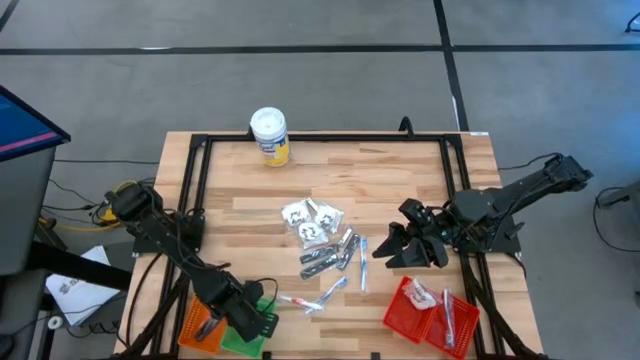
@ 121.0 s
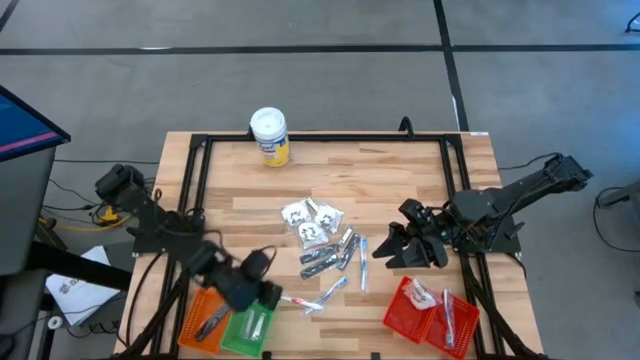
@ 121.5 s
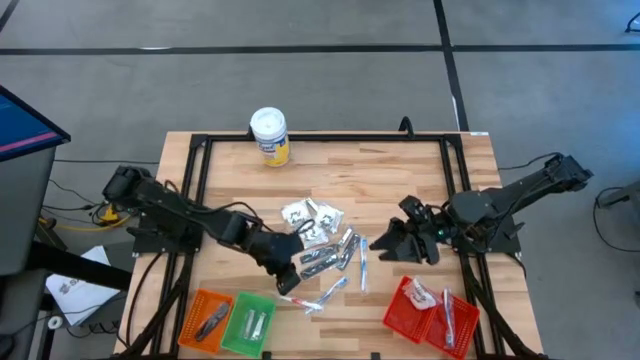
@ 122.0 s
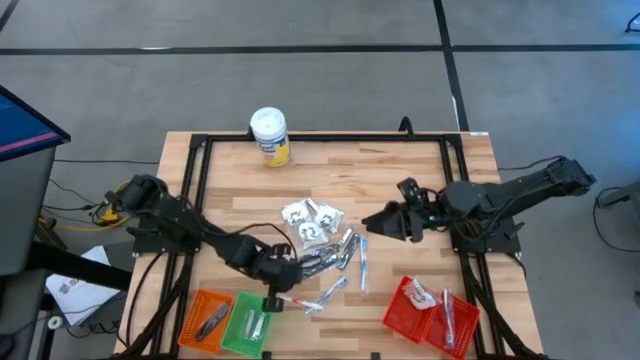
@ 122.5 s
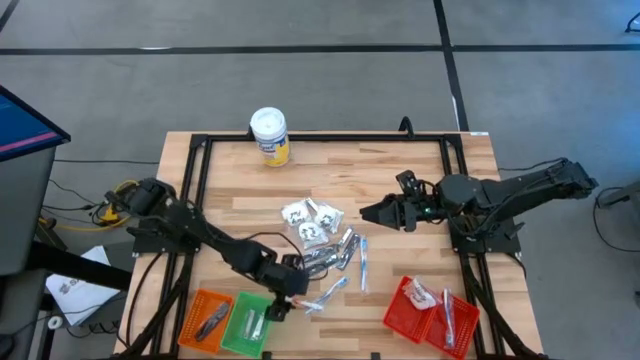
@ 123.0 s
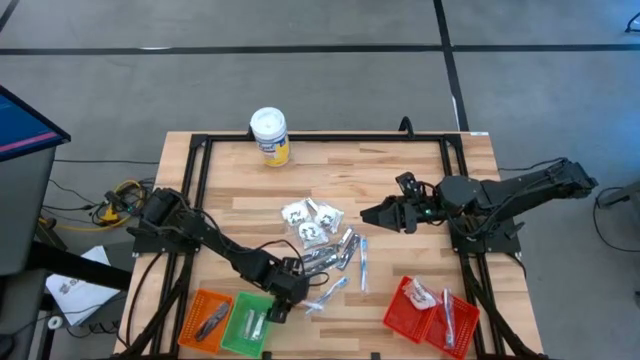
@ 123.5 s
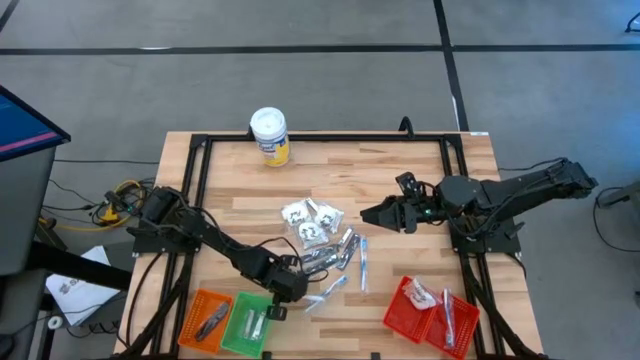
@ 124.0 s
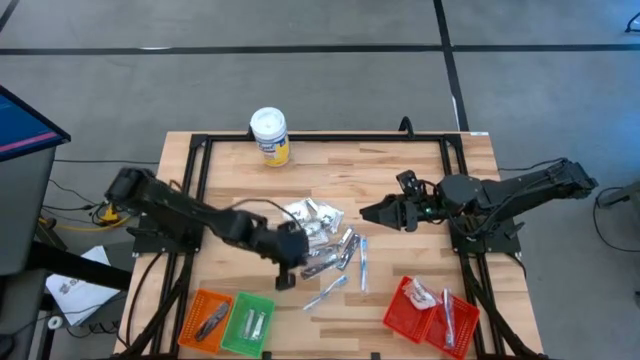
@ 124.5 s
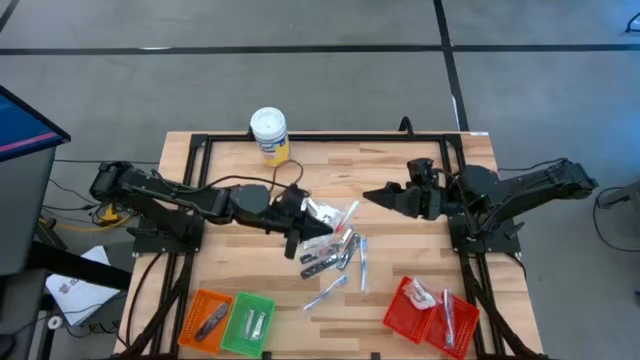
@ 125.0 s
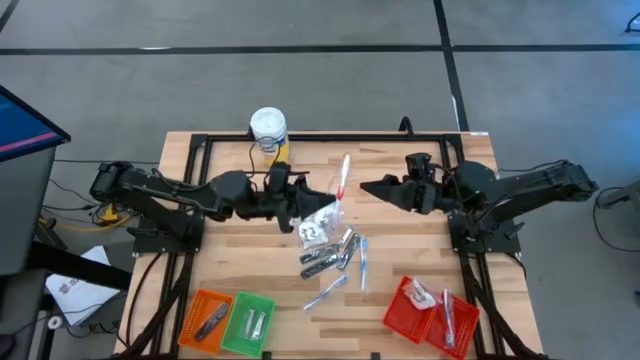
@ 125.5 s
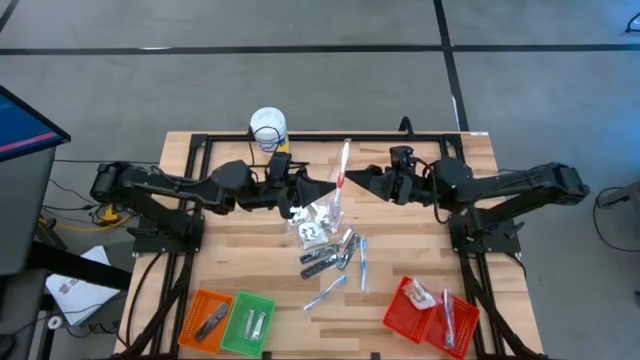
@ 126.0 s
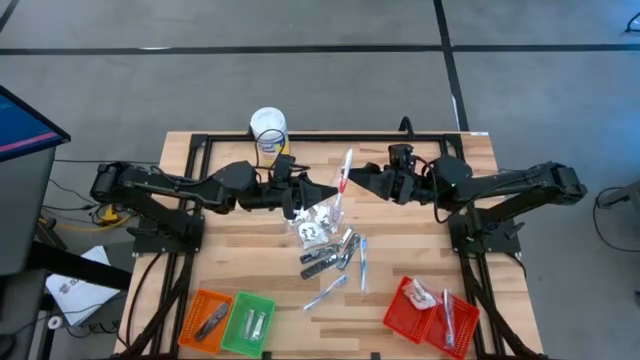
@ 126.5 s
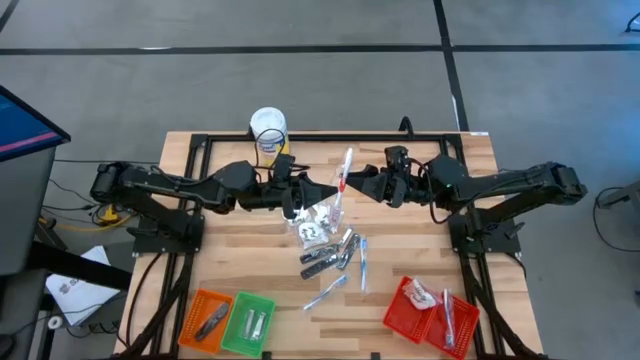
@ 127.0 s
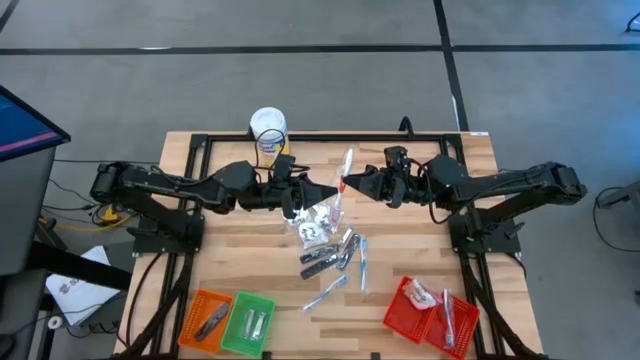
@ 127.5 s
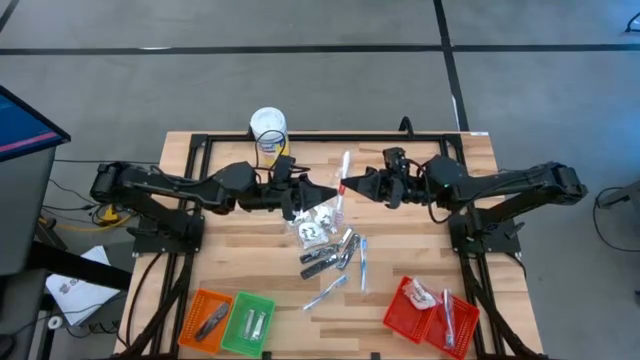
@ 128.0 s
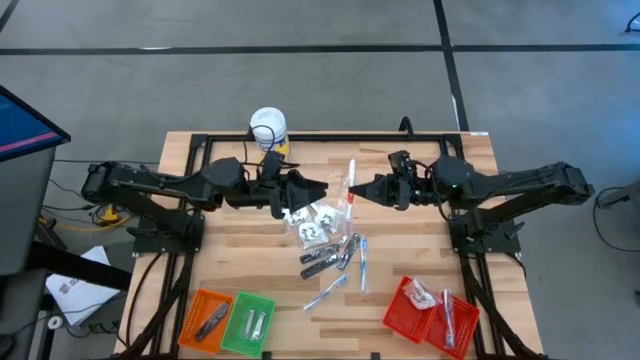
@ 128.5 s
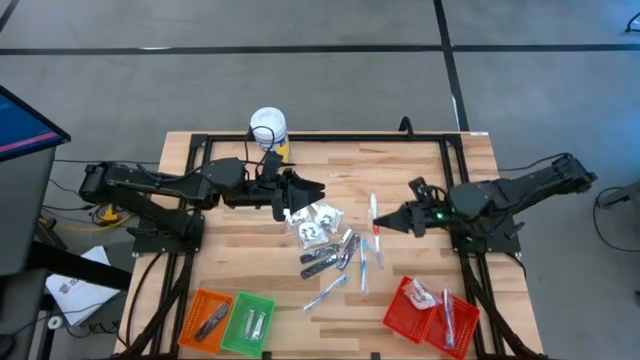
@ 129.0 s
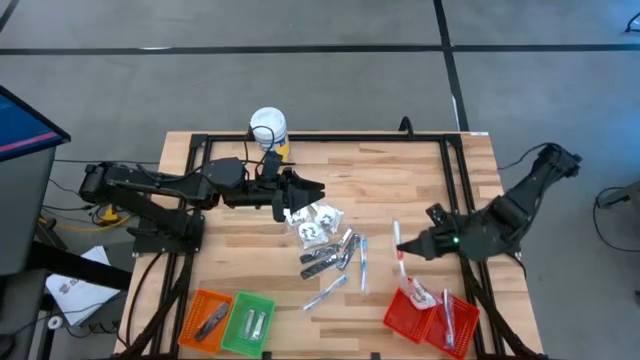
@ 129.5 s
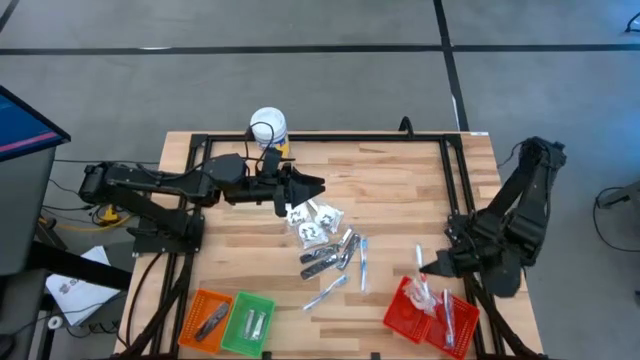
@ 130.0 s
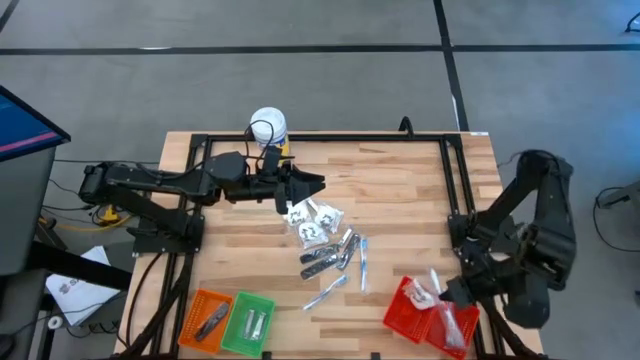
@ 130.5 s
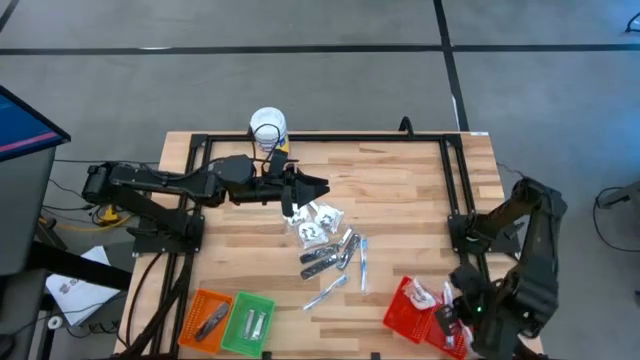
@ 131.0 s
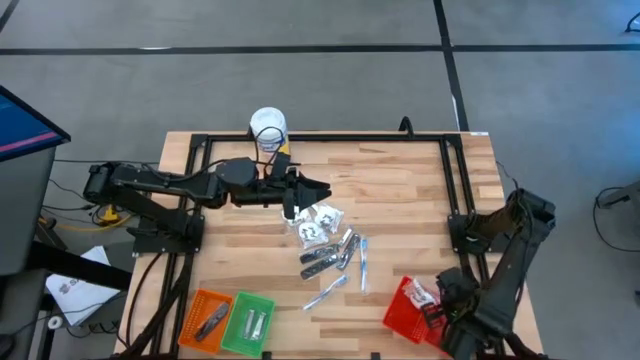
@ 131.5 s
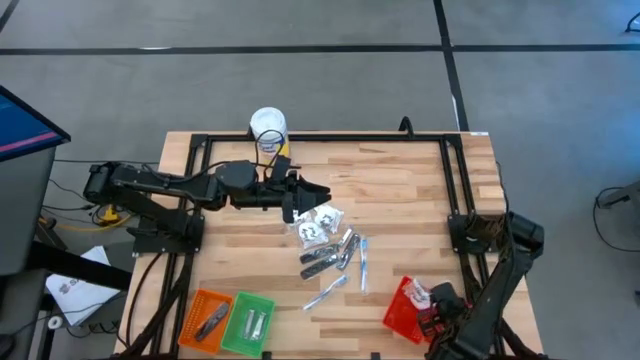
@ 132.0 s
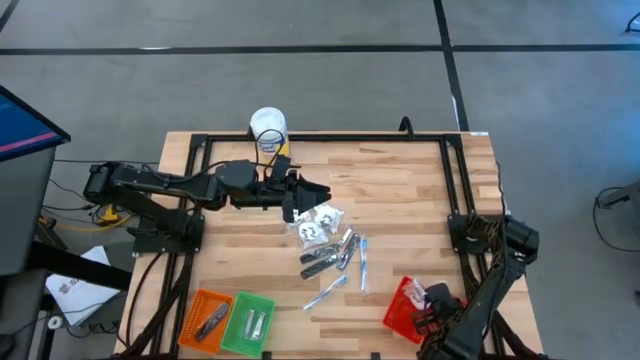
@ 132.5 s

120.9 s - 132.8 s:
Task: Pick & Place Travel size toiletries
Put the red toothbrush into the right red basket

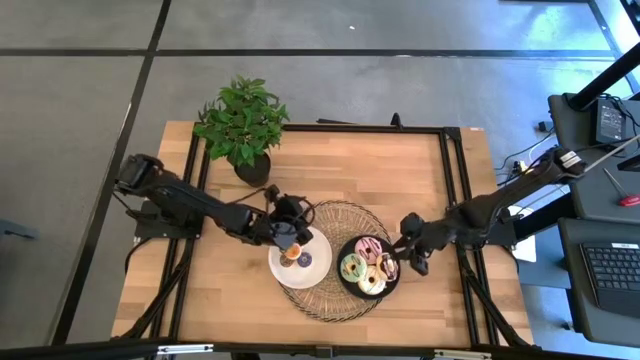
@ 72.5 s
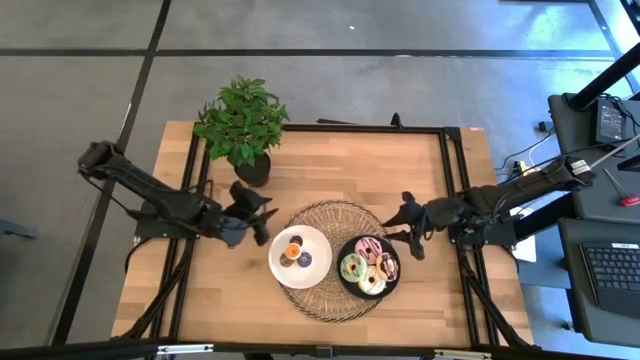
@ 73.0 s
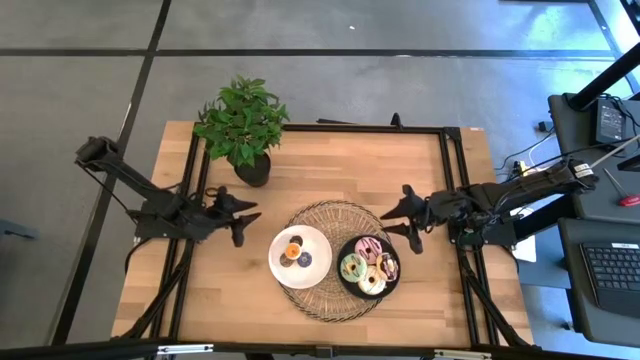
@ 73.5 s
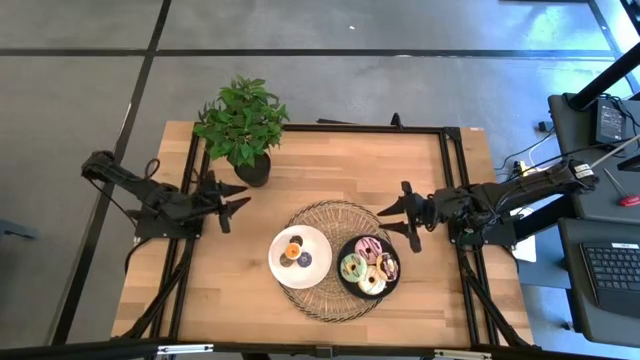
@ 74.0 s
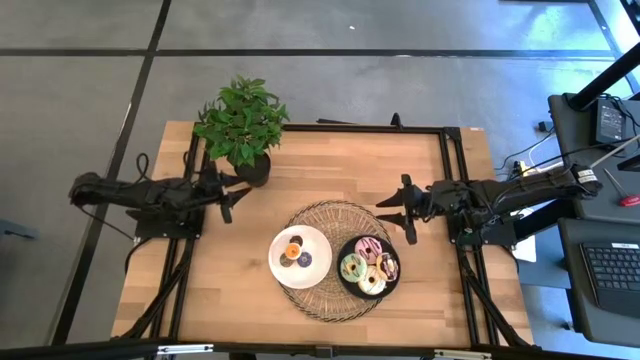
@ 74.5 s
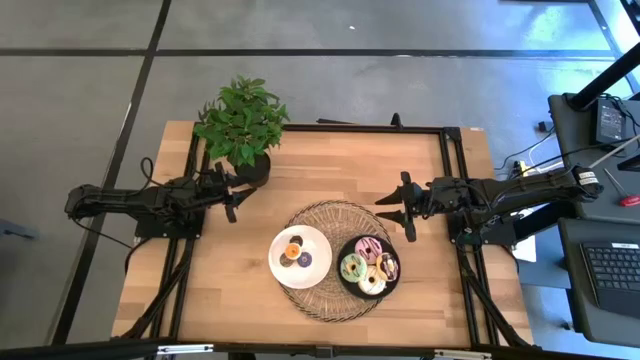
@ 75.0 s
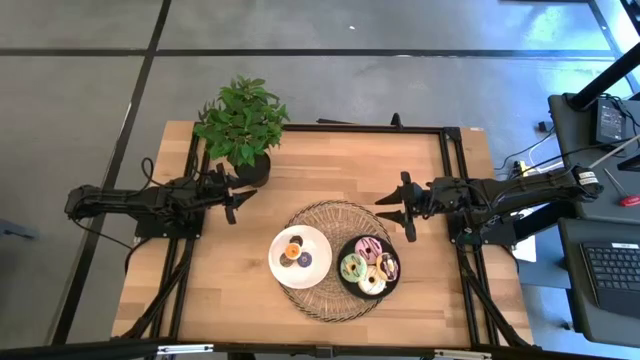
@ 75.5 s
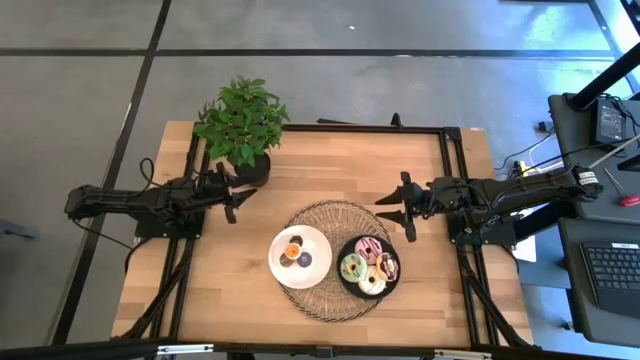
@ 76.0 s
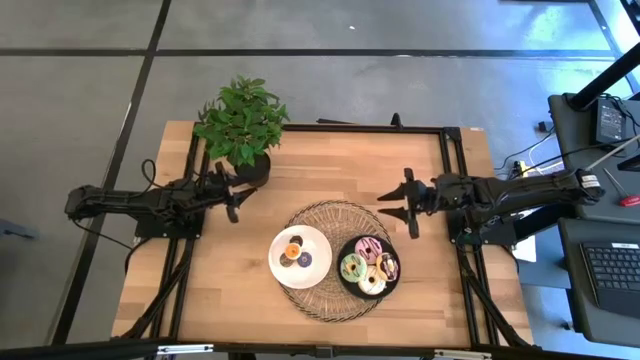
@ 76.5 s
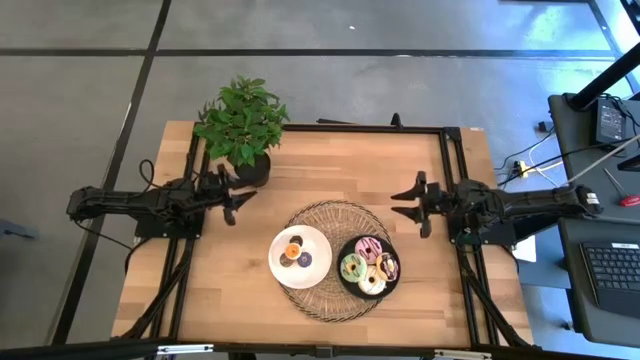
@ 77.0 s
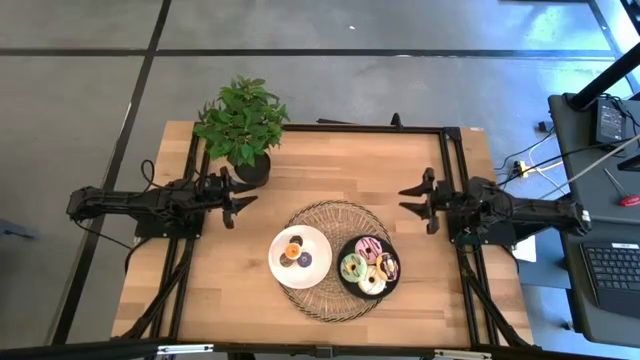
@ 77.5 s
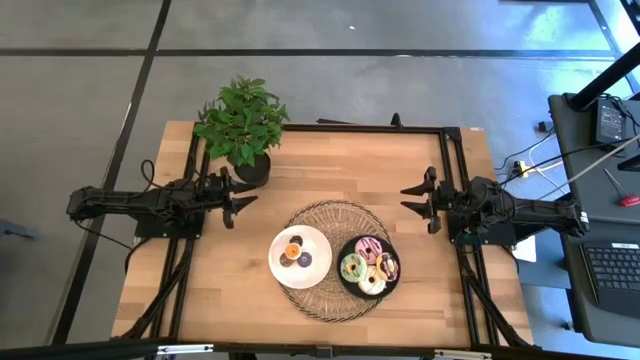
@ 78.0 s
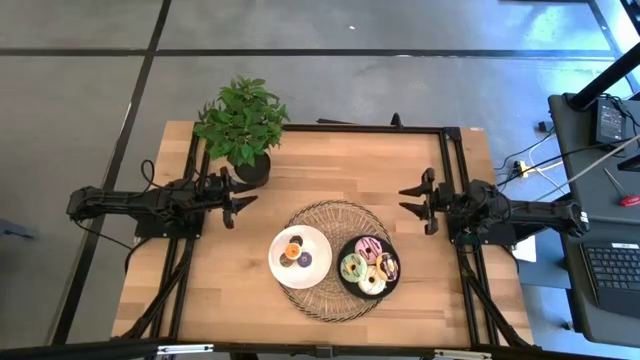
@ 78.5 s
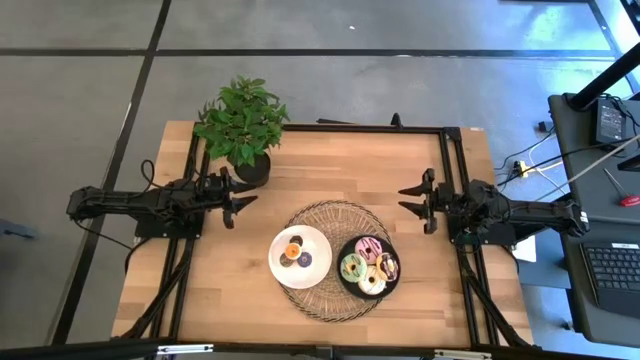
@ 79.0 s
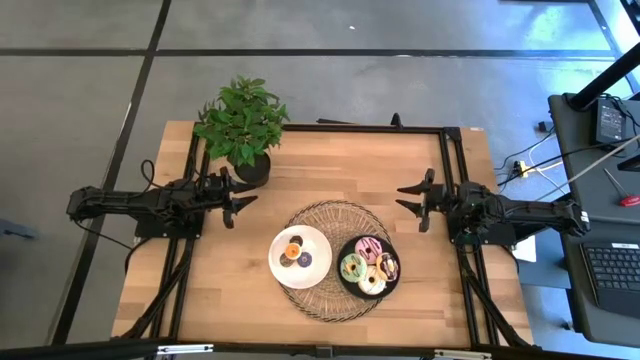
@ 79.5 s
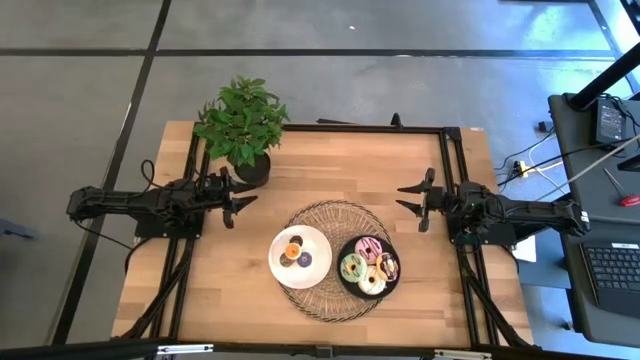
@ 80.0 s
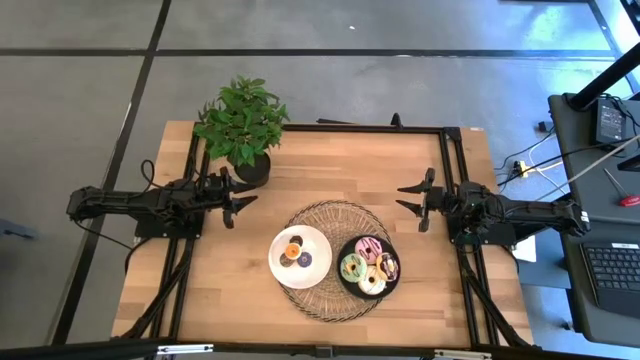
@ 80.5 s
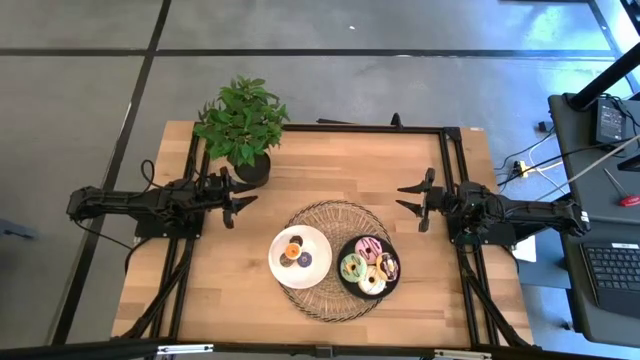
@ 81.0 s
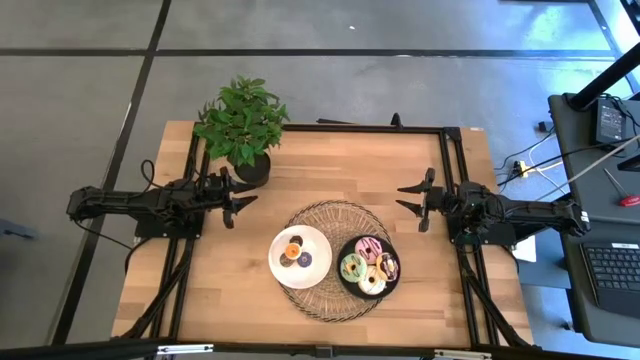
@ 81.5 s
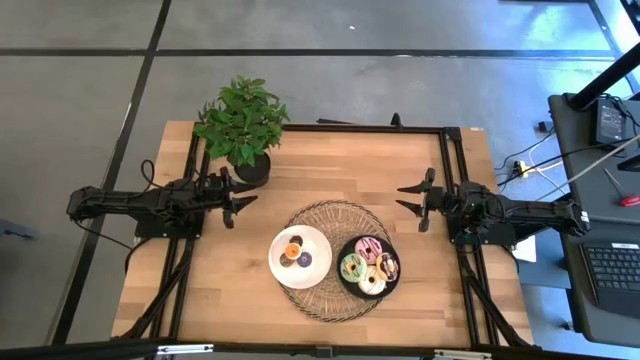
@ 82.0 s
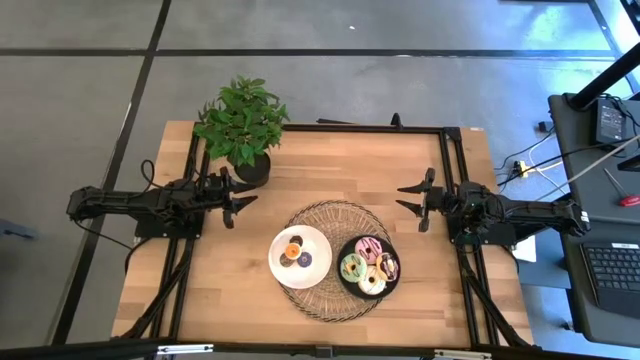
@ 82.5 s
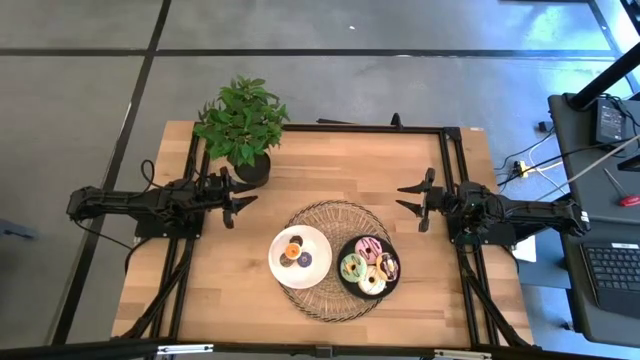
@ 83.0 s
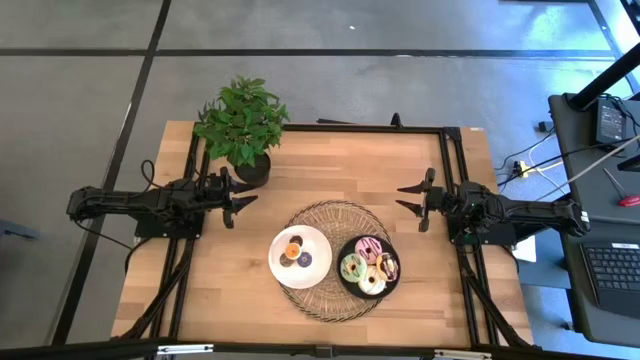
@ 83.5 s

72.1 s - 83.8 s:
Task: Pick & Place donuts
Return to Home Position
